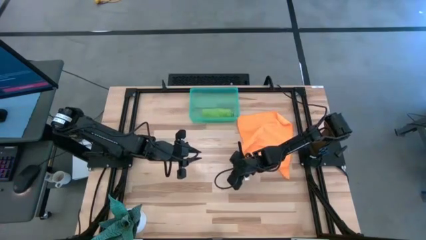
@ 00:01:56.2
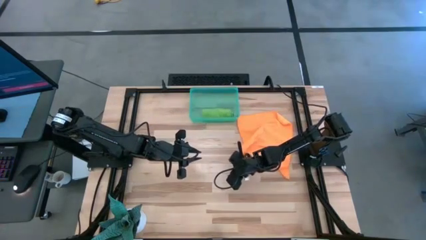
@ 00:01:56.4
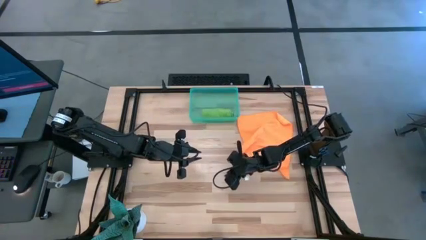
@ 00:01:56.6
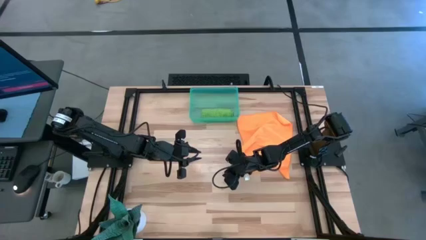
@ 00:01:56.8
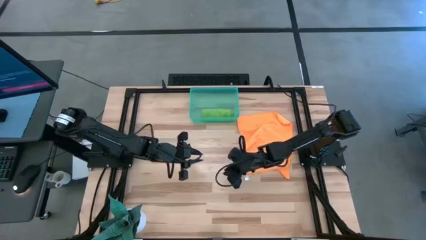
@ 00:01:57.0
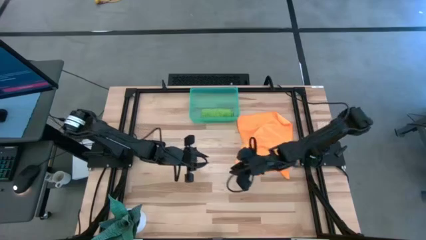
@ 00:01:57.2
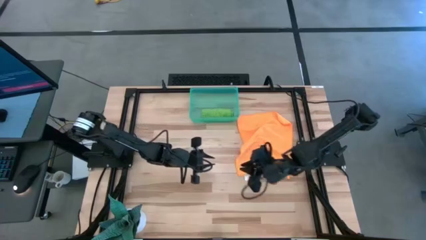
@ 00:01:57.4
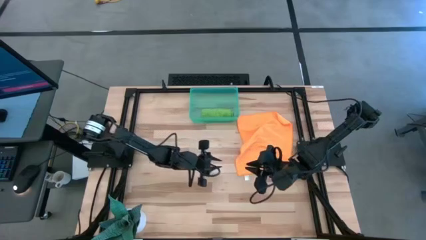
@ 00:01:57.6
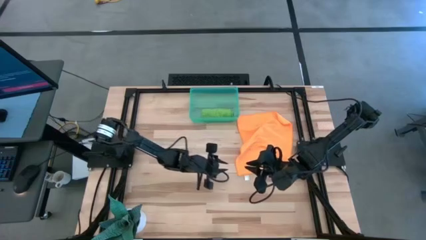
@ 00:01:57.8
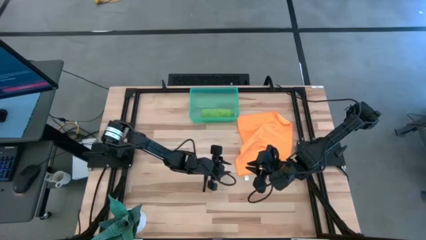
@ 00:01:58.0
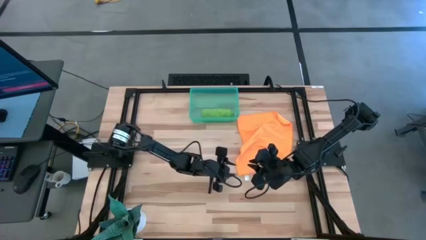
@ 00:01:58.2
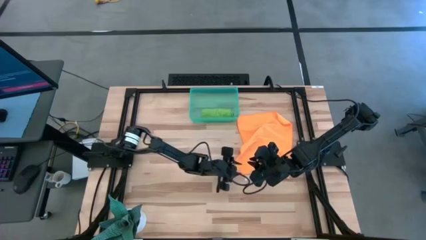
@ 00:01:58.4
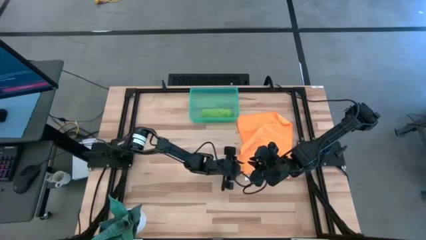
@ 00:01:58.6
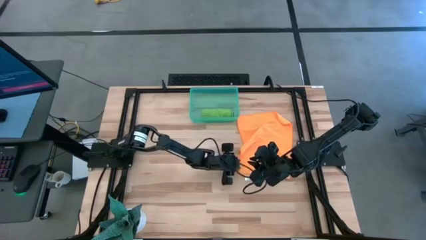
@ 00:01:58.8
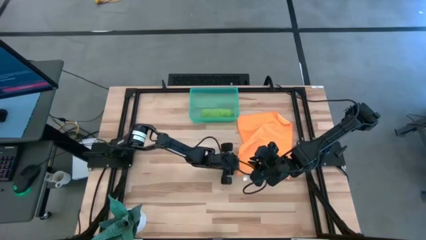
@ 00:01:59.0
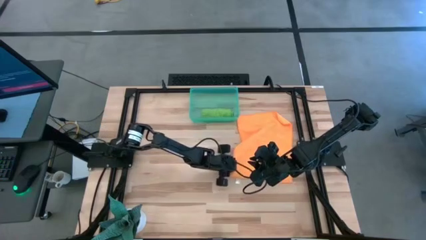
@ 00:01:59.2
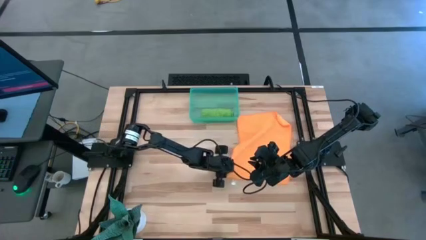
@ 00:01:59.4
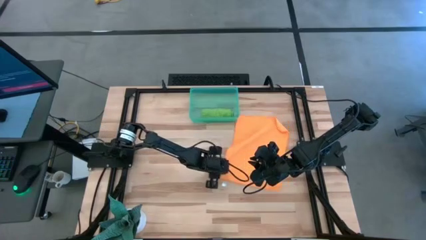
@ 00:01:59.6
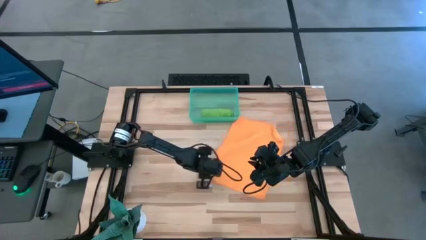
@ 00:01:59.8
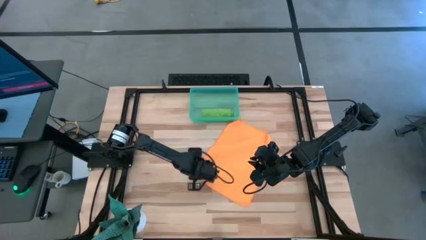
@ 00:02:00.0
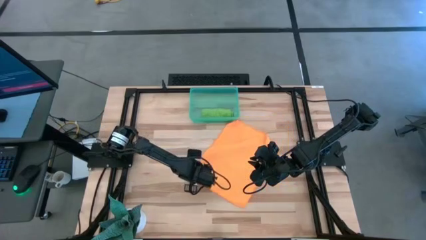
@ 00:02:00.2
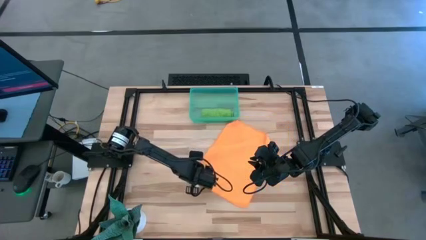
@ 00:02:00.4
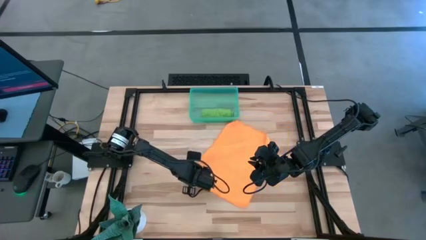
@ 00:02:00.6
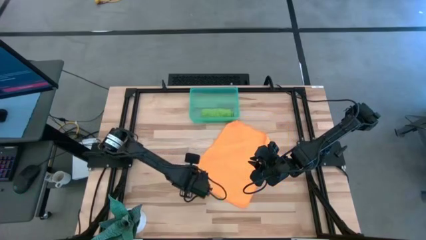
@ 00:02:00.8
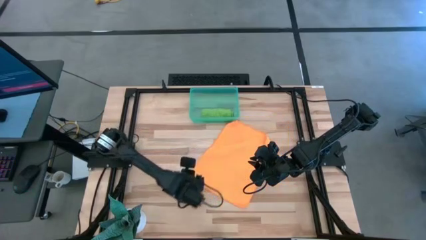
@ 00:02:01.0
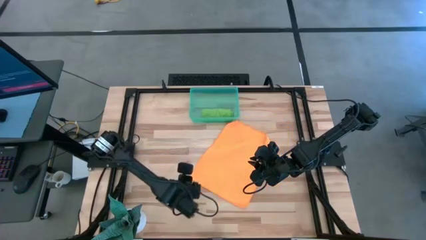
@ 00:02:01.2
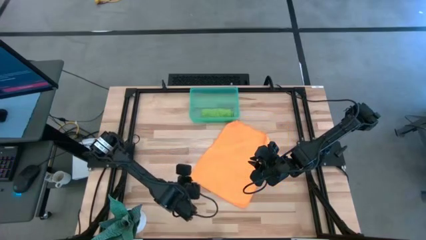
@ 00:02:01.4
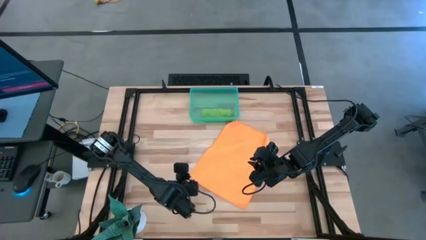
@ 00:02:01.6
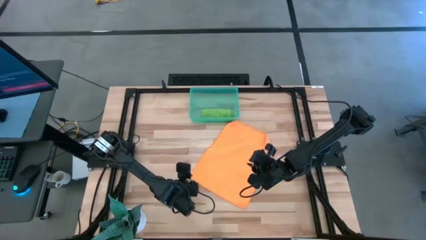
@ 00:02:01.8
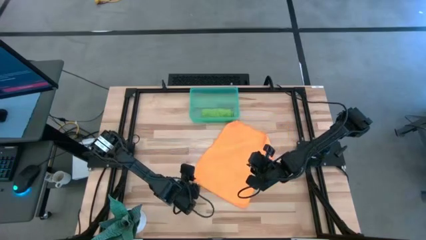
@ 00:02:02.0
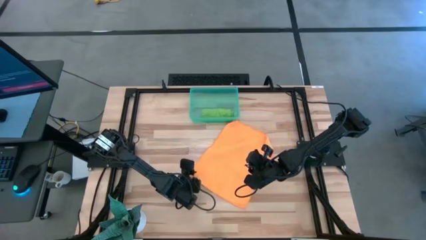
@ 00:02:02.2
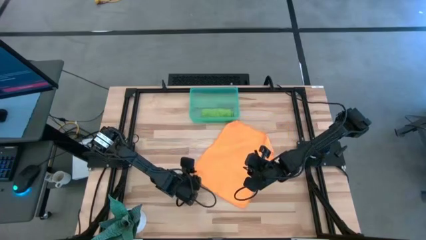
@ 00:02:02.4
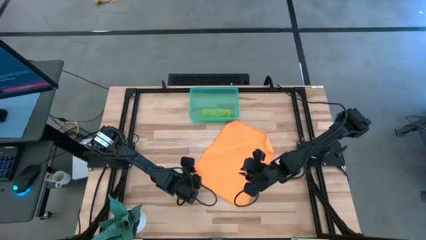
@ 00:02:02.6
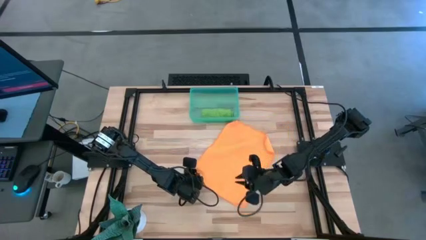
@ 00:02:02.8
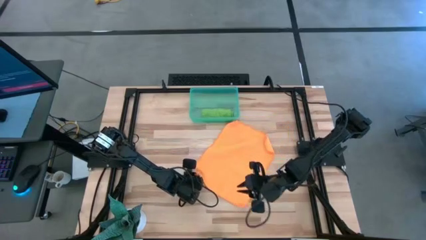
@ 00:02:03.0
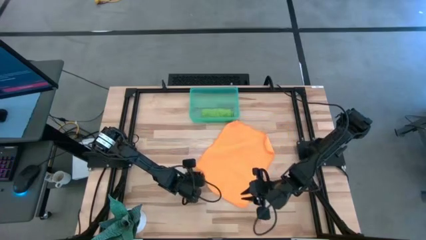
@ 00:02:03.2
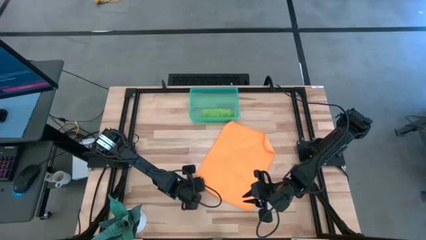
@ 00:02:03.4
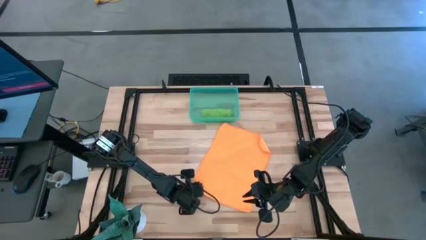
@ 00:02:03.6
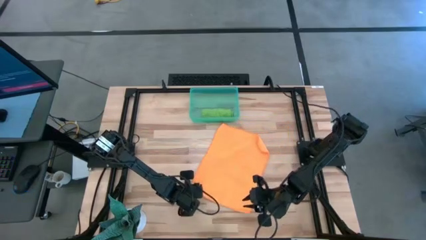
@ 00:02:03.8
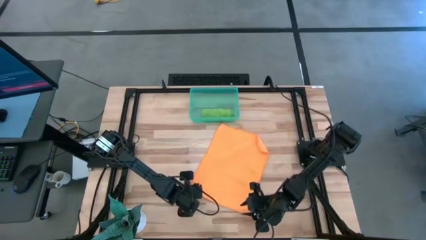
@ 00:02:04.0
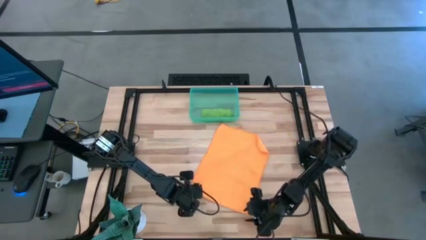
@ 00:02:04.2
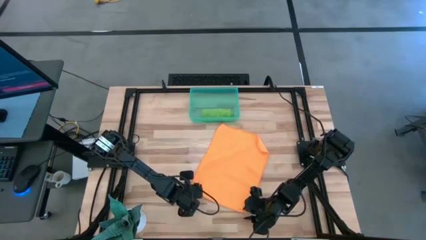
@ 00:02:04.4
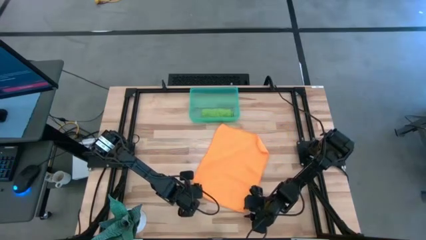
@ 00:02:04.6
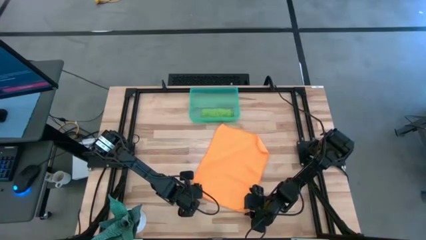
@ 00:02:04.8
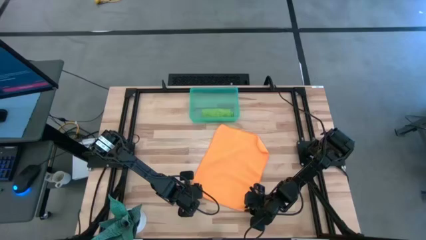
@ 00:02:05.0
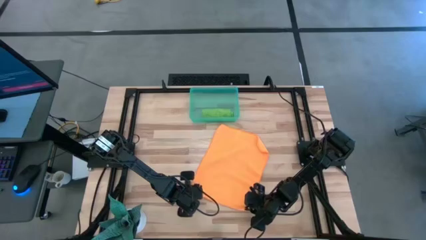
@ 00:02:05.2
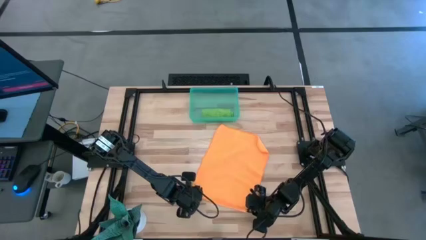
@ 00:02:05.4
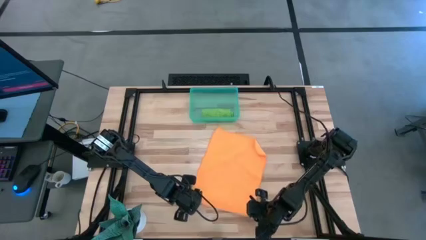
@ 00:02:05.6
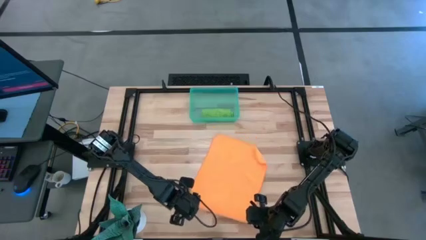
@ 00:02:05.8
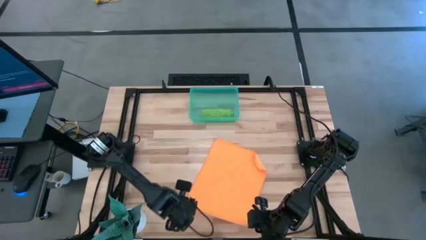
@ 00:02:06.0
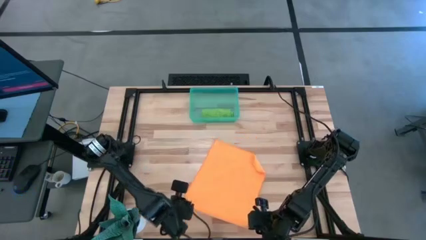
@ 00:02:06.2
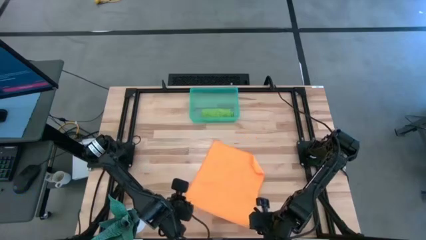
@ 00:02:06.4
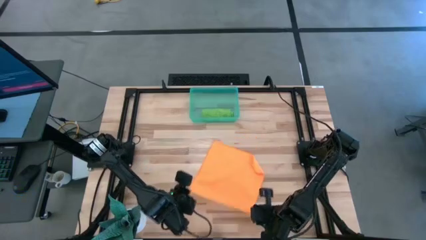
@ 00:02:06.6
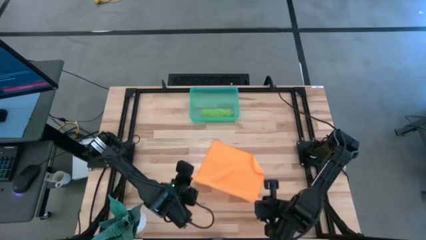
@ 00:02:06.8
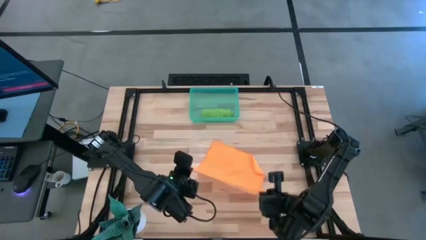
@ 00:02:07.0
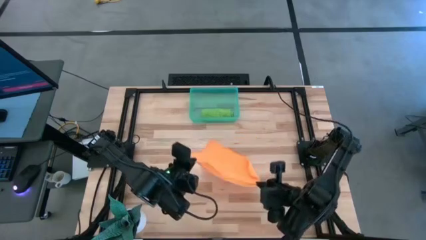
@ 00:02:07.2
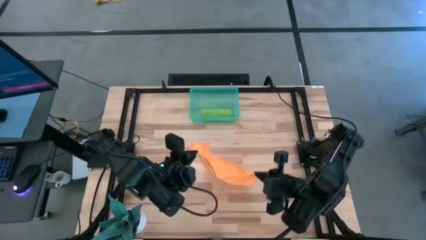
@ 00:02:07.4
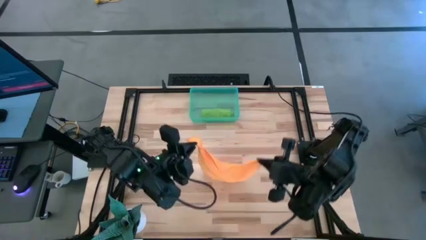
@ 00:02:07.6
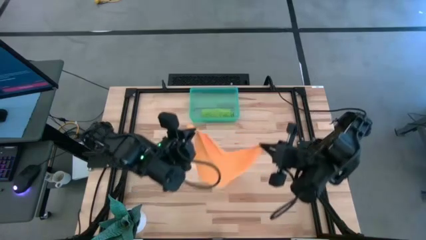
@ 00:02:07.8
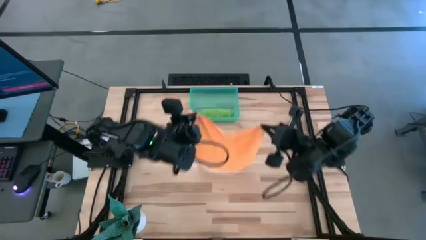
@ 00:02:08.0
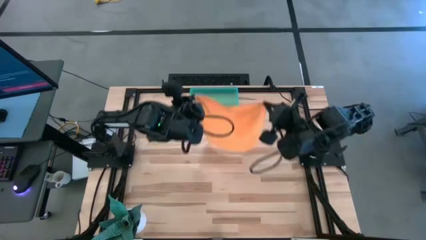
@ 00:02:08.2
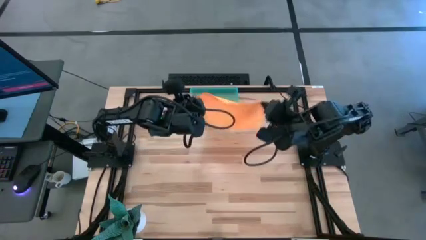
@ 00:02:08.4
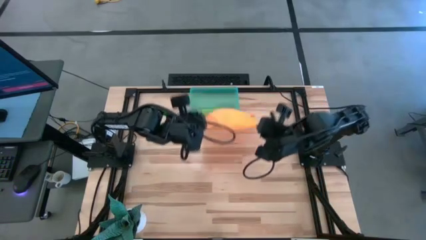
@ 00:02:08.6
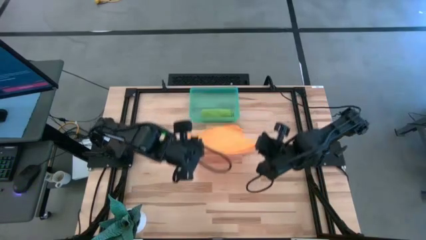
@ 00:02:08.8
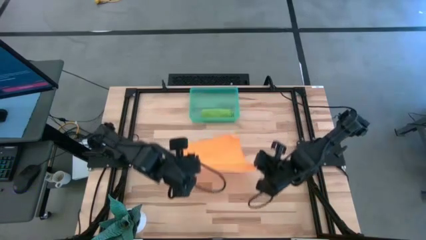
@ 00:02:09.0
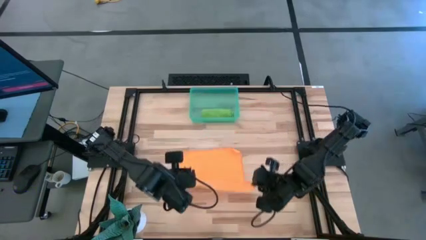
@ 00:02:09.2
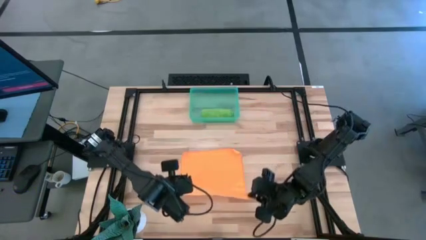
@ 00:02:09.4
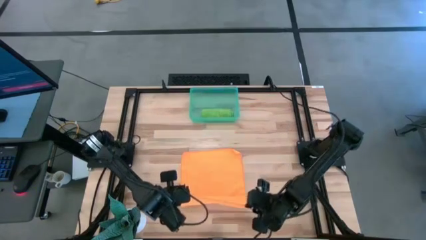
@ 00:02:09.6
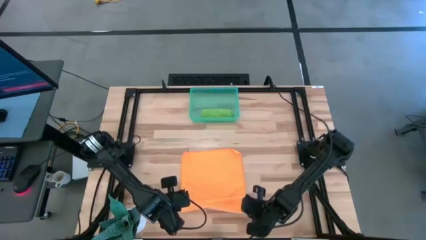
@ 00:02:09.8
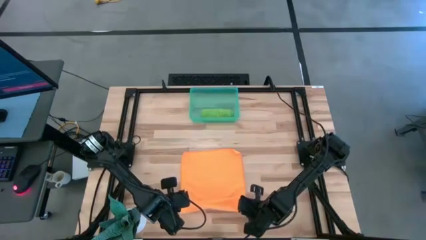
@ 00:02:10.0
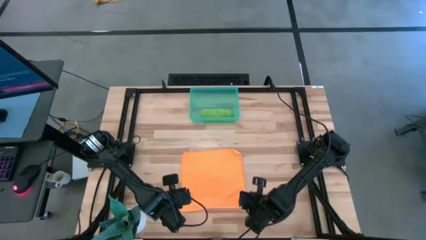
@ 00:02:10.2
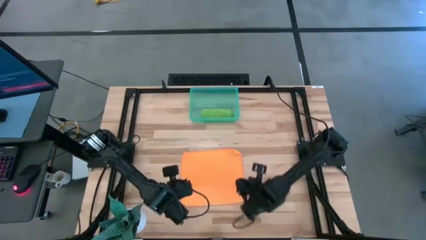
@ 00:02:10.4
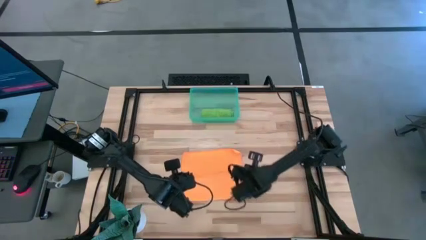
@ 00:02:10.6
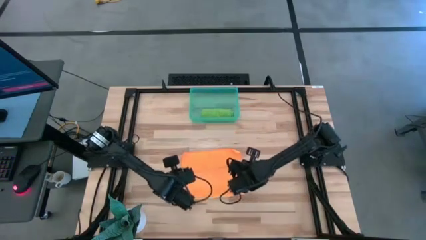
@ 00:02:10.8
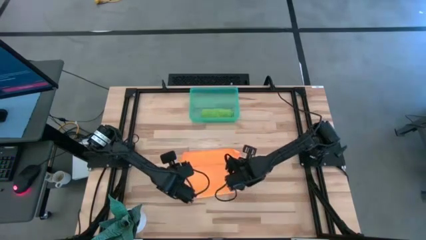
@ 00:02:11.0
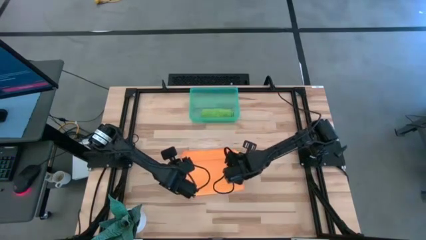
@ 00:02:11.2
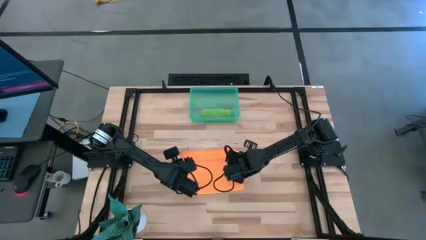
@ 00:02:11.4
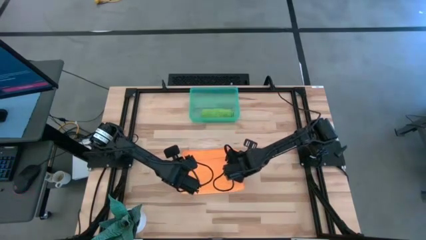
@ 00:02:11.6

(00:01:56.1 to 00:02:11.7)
Task: Roll microfiber towels into tight, uniform cylinder then place into a basket
Fold the orange towel
